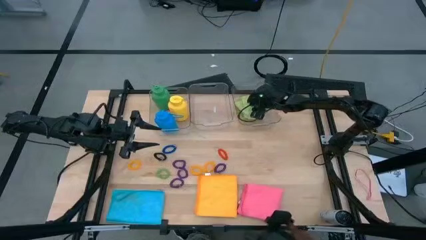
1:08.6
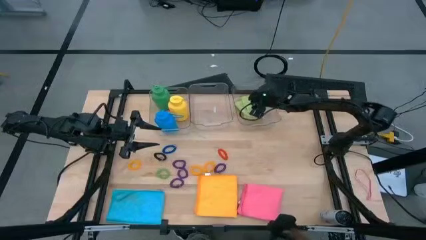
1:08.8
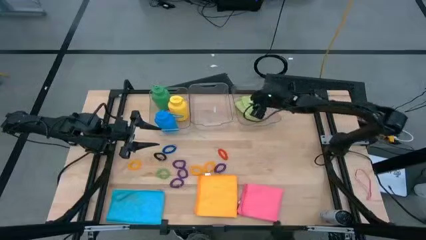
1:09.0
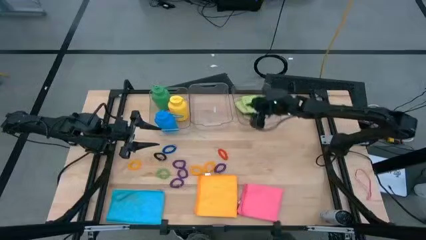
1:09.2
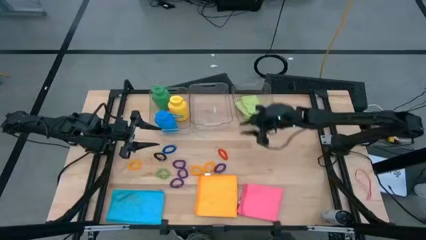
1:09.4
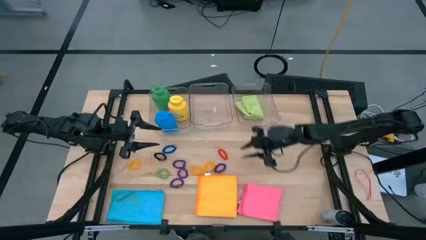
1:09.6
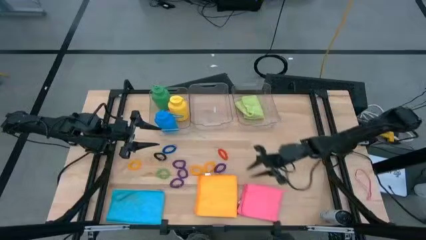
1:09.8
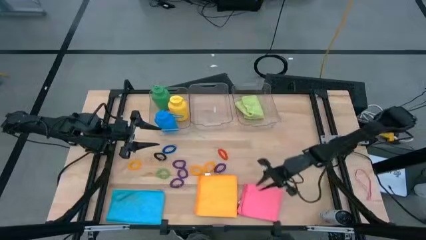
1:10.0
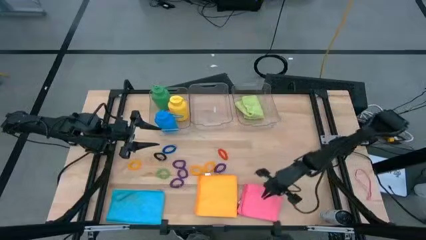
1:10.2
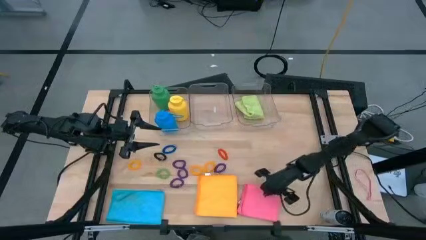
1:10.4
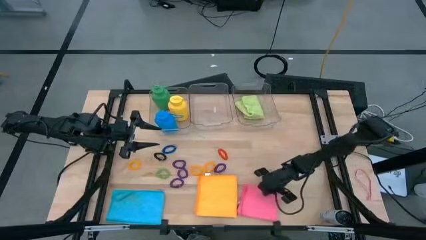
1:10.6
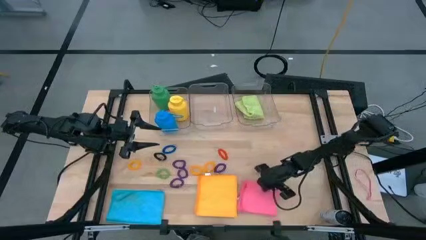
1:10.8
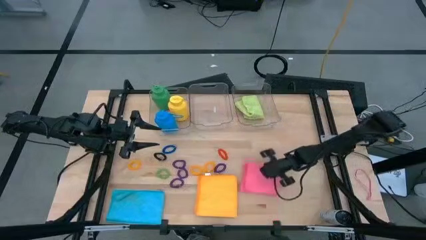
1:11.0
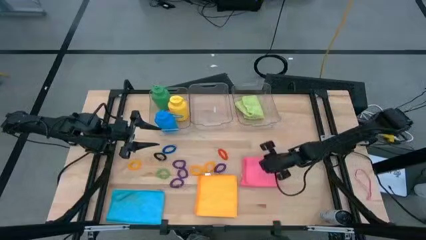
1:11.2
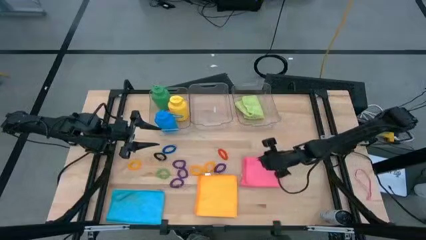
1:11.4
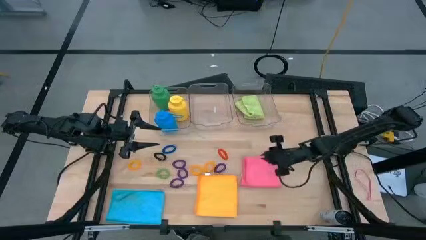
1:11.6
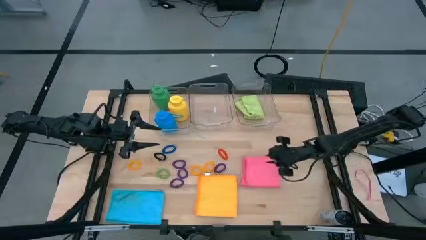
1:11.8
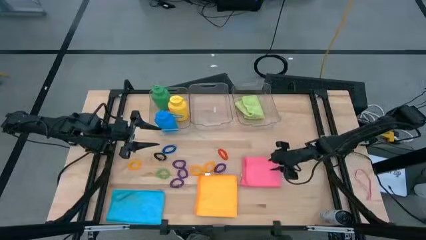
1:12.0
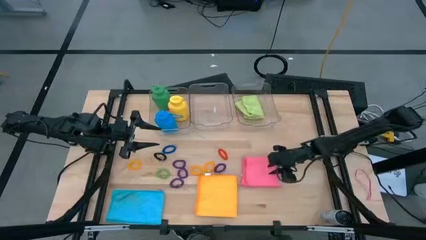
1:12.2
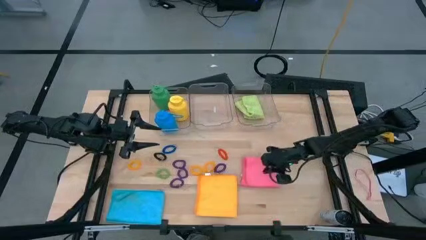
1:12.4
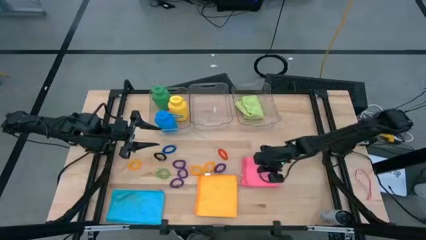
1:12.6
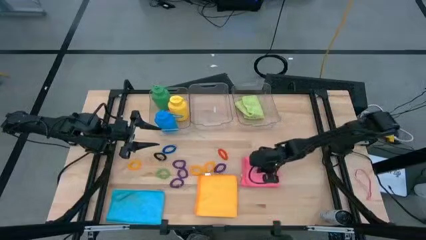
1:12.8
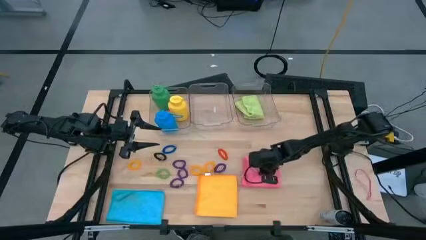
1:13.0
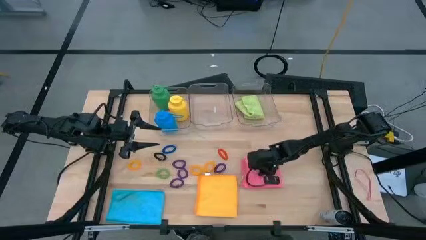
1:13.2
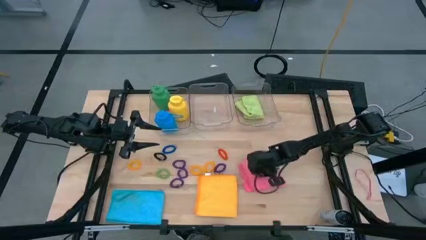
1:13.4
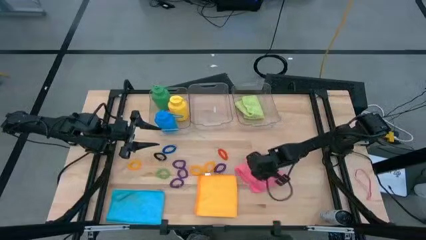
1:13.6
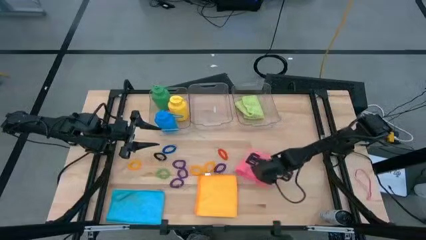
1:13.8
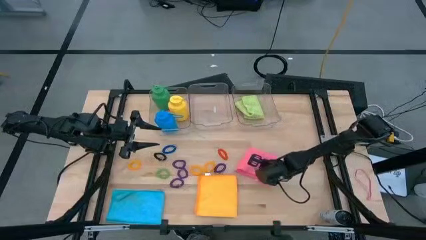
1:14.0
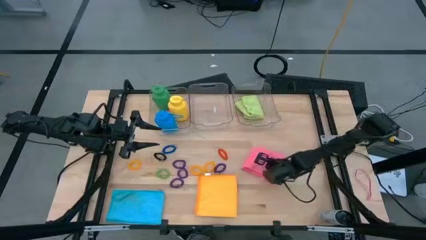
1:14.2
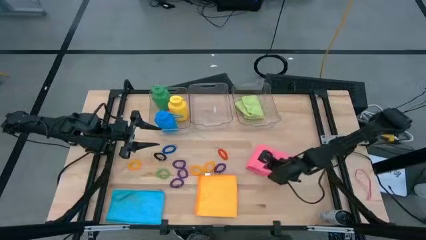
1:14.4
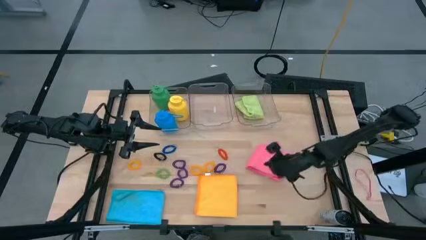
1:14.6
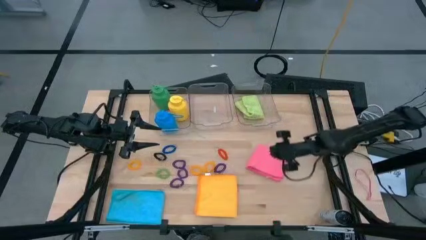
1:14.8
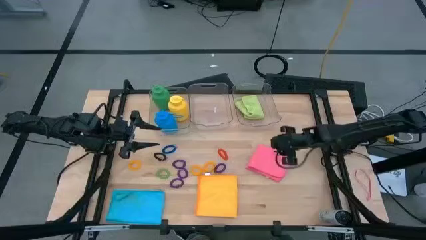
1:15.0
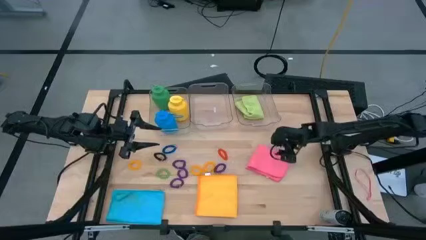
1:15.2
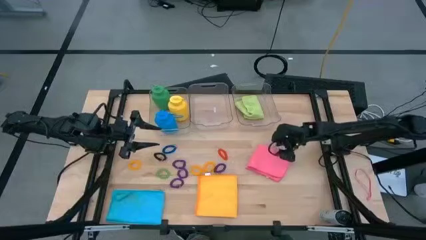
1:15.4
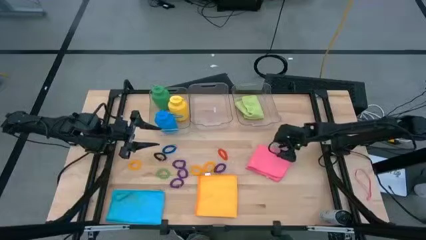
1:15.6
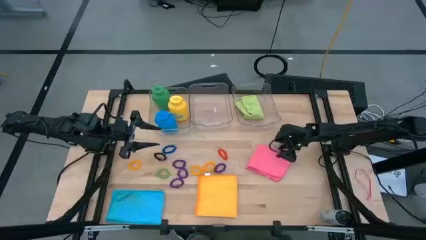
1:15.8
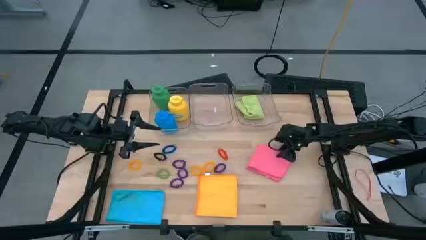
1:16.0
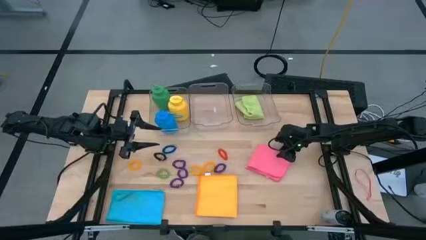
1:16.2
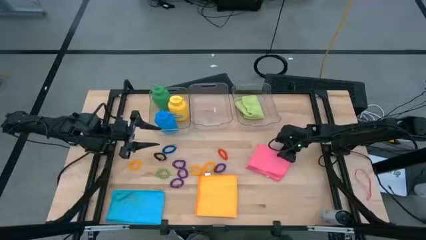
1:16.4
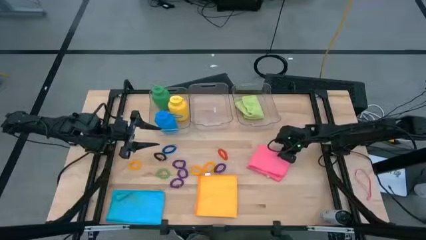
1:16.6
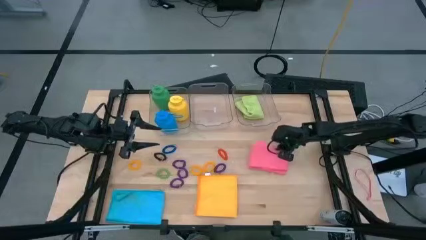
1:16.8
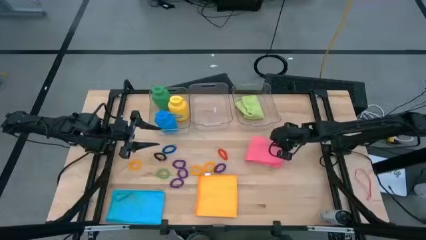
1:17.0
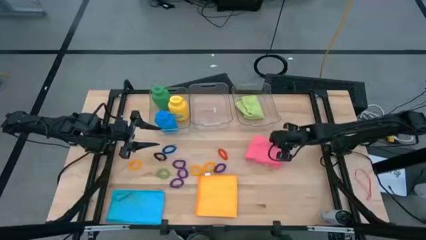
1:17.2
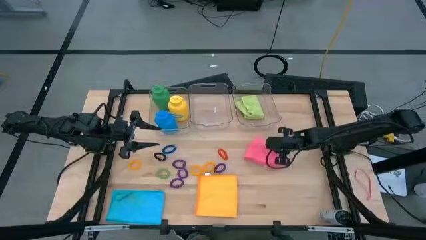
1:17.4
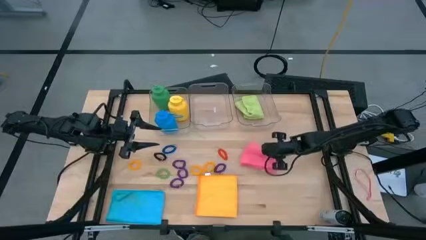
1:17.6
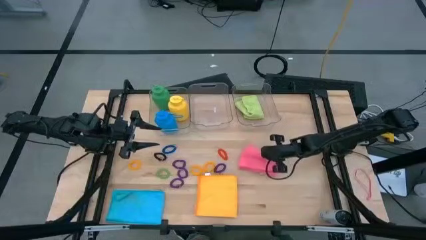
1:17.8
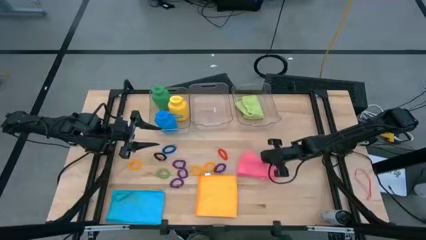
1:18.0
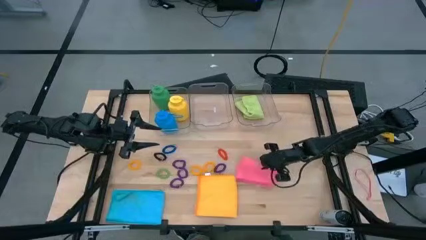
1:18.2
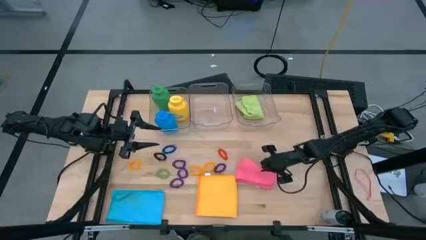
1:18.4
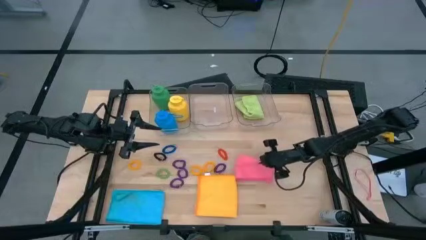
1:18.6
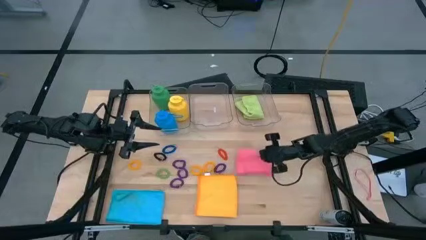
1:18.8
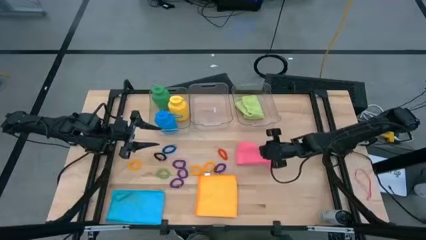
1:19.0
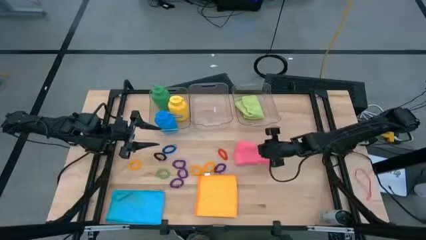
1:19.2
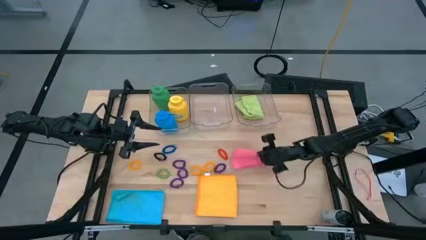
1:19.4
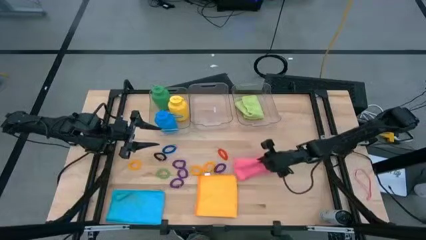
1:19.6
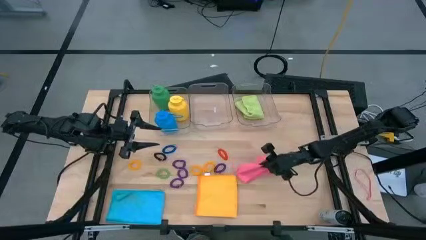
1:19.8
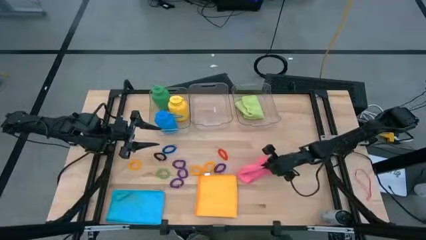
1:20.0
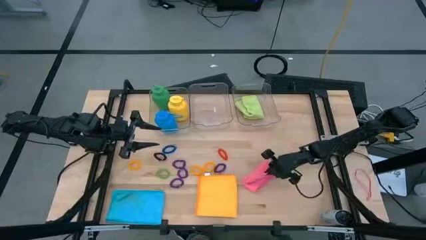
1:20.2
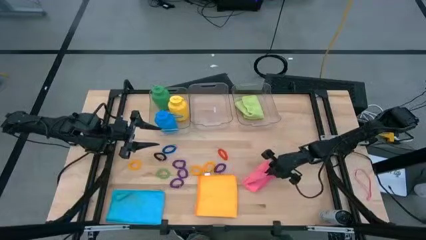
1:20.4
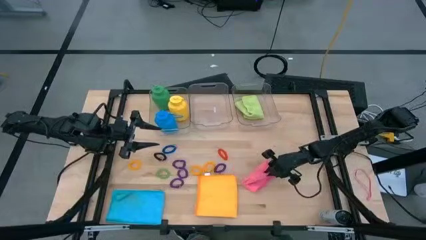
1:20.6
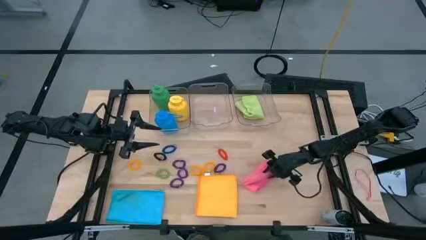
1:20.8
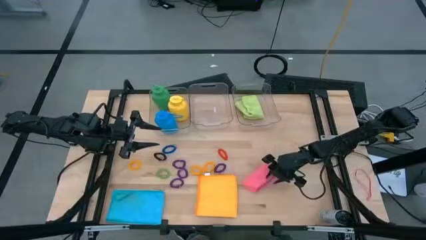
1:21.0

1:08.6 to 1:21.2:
Task: Pick & Place Sports Items
Fold the pink cloth

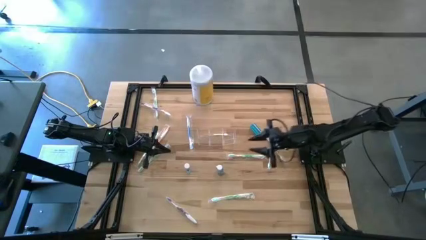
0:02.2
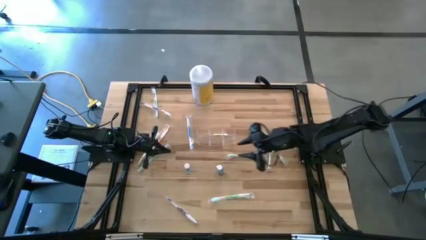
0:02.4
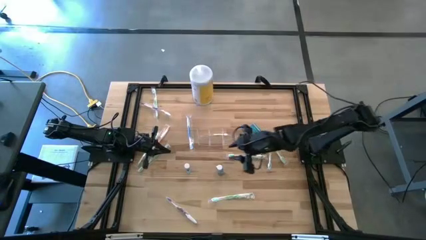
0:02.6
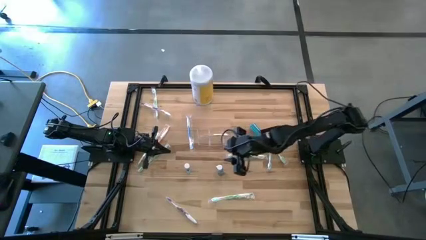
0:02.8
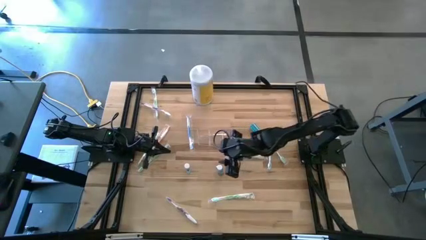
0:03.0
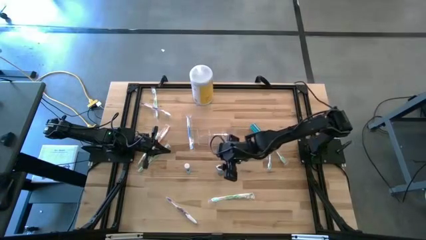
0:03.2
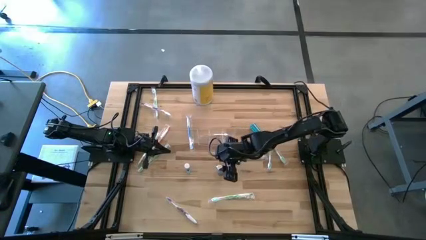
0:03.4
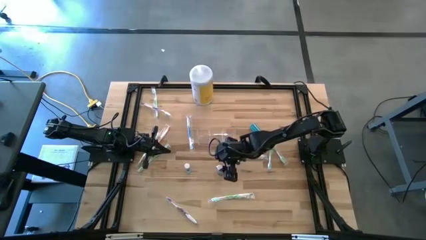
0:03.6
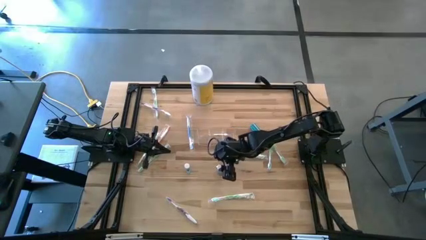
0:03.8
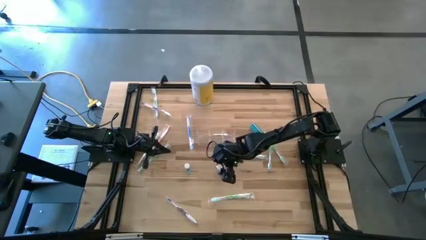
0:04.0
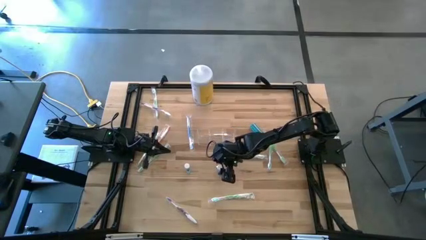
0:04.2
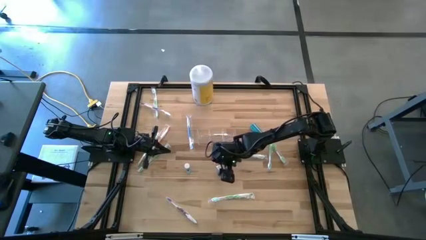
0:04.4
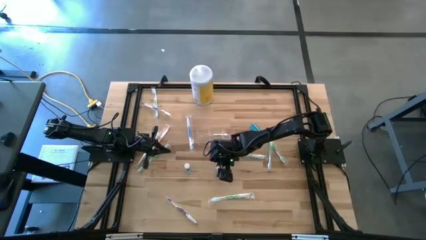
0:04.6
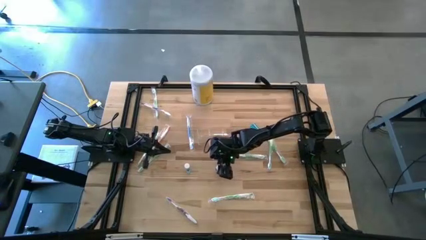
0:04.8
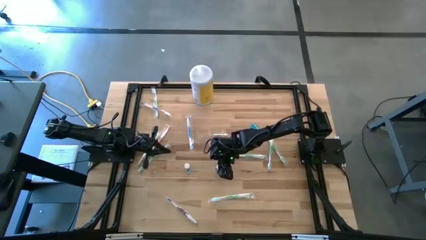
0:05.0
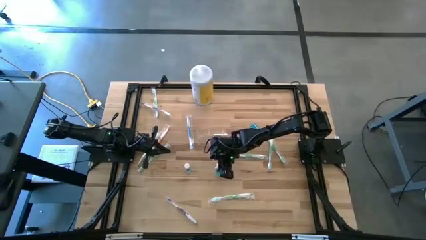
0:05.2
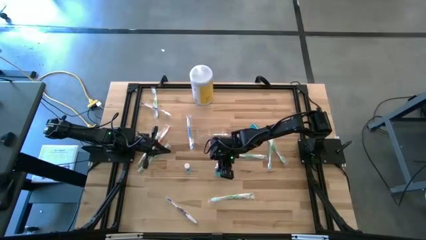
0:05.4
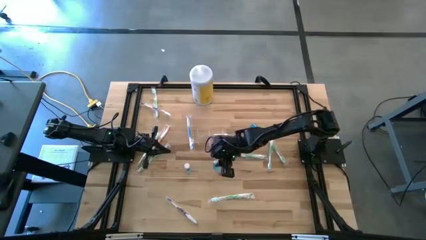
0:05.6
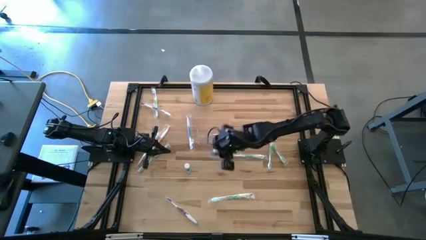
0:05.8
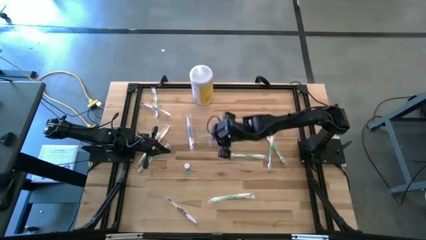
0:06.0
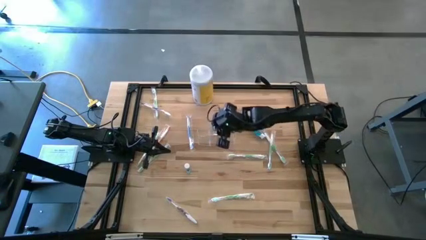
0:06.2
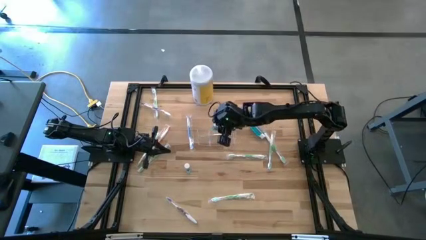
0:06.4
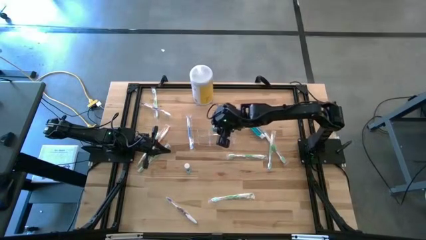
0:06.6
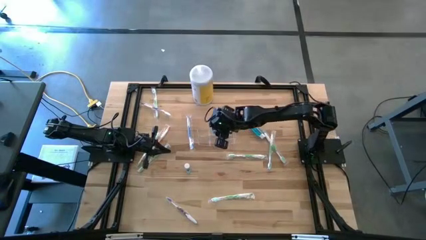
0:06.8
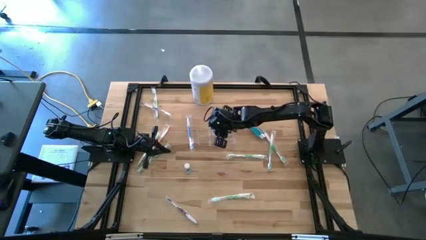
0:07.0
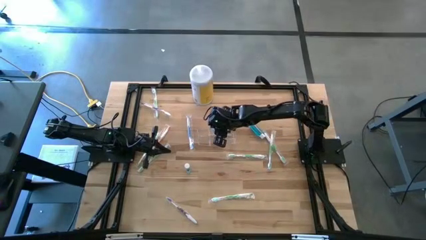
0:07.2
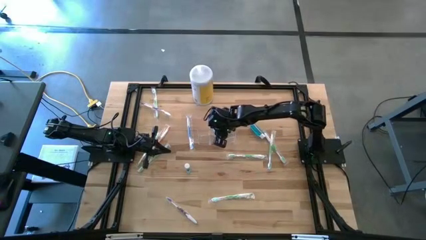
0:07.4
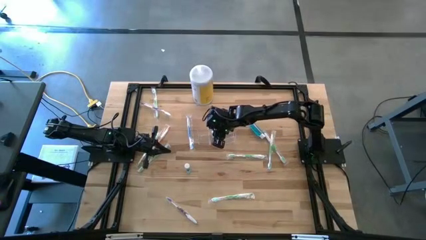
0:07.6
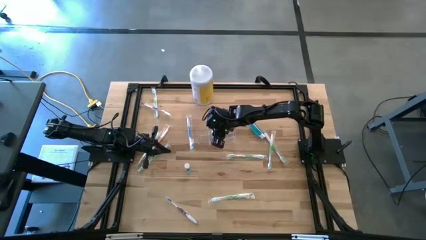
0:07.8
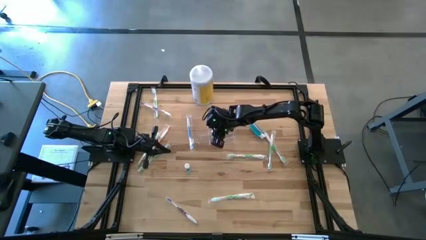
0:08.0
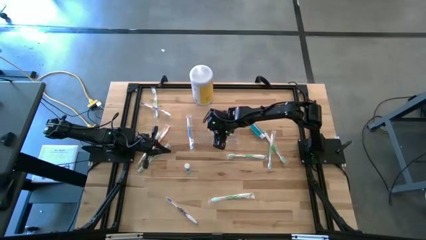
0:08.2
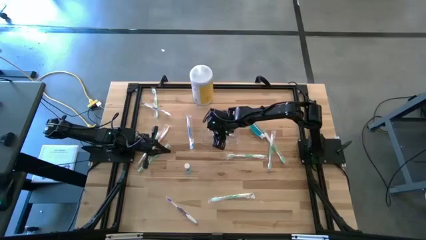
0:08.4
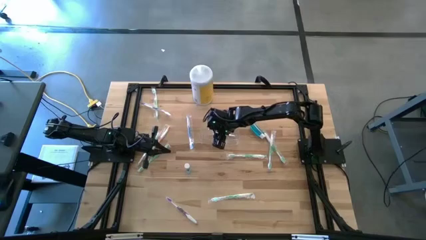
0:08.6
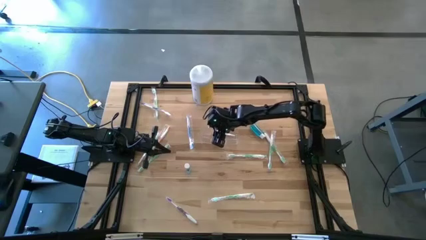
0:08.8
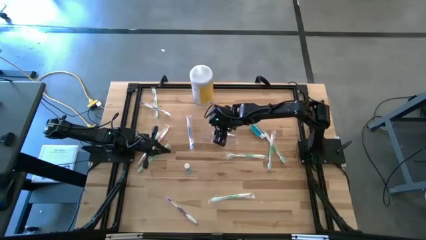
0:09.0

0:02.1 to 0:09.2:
Task: Pick & Place toothbrushing station
Put the bottom right mouthwash into the middle section of the transparent organizer
